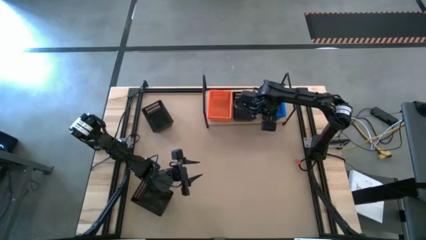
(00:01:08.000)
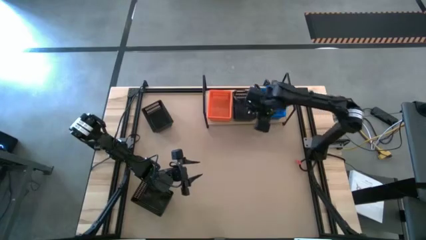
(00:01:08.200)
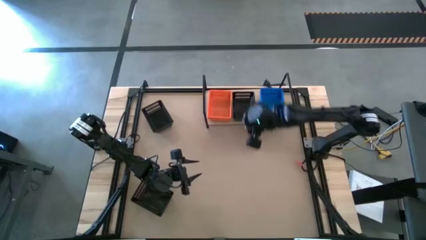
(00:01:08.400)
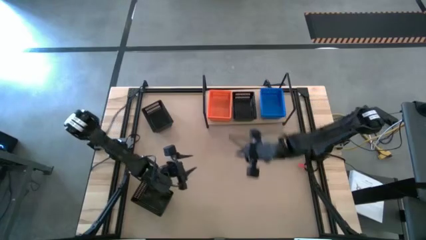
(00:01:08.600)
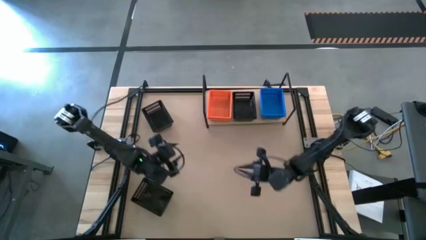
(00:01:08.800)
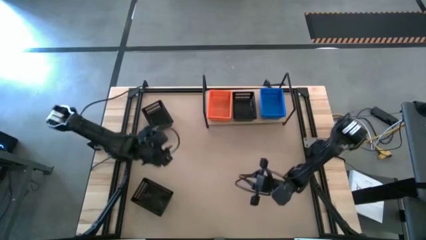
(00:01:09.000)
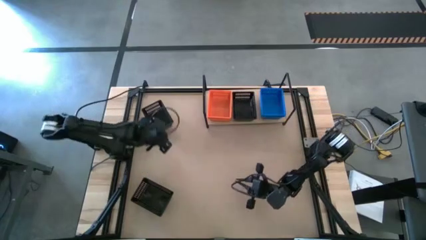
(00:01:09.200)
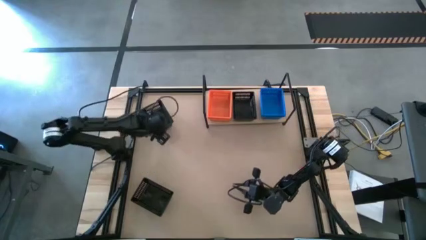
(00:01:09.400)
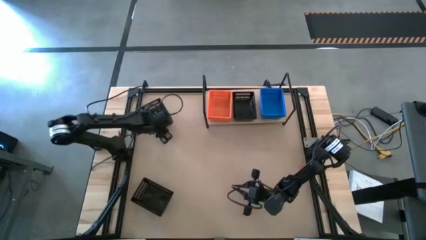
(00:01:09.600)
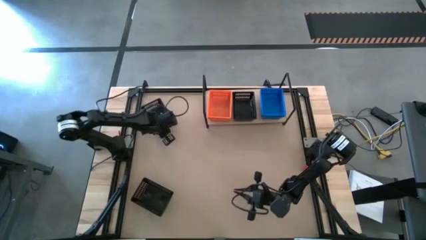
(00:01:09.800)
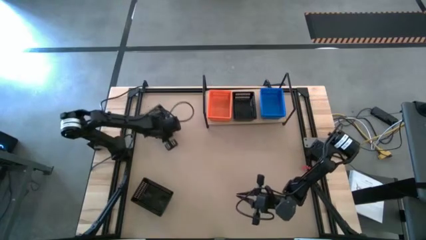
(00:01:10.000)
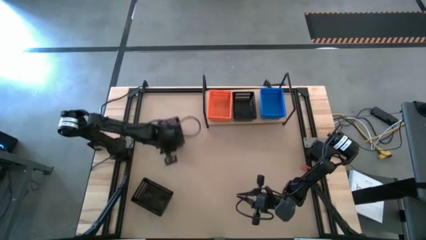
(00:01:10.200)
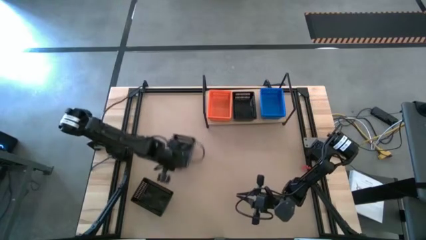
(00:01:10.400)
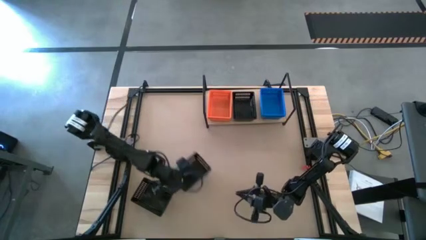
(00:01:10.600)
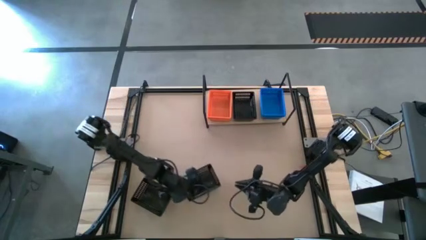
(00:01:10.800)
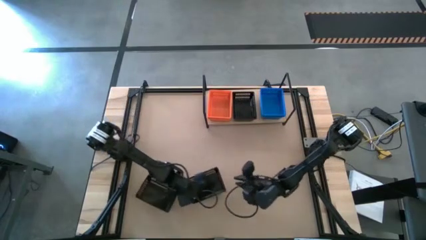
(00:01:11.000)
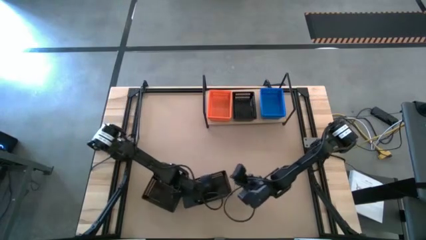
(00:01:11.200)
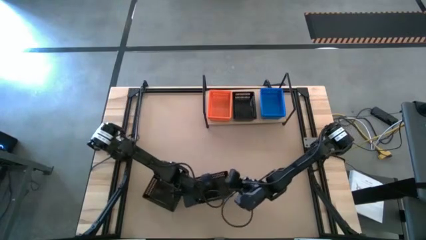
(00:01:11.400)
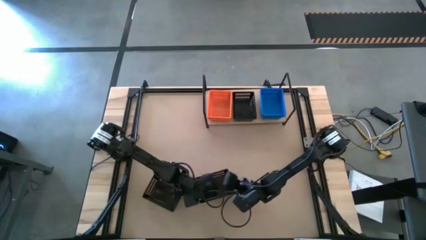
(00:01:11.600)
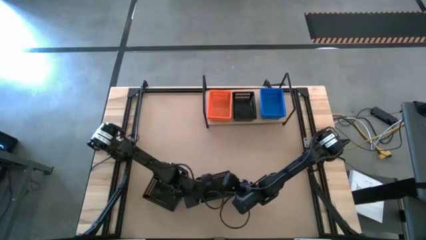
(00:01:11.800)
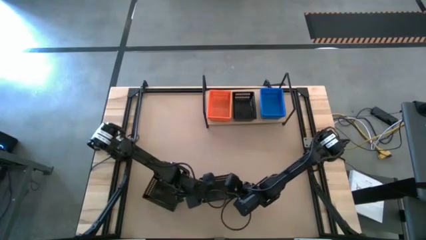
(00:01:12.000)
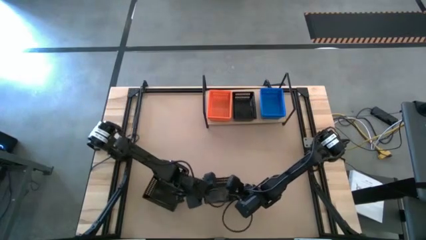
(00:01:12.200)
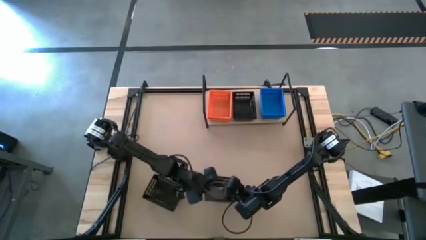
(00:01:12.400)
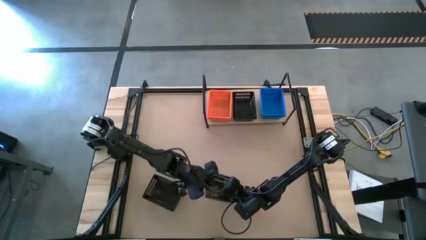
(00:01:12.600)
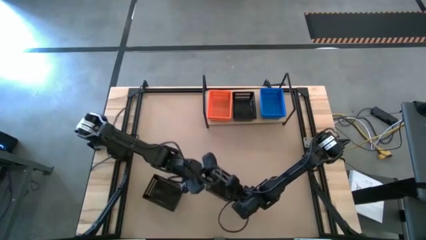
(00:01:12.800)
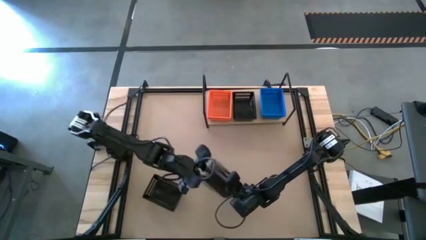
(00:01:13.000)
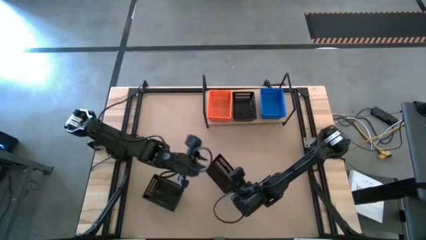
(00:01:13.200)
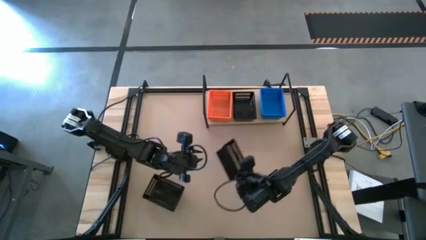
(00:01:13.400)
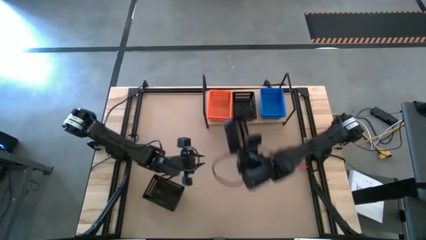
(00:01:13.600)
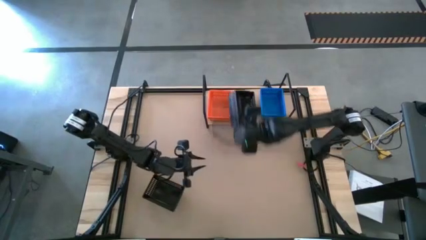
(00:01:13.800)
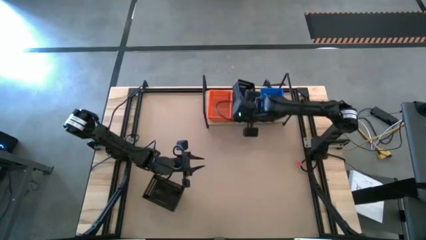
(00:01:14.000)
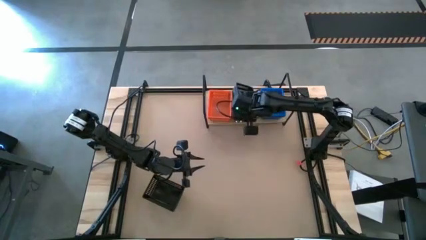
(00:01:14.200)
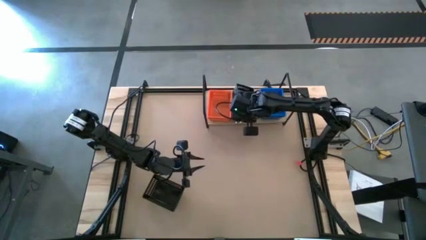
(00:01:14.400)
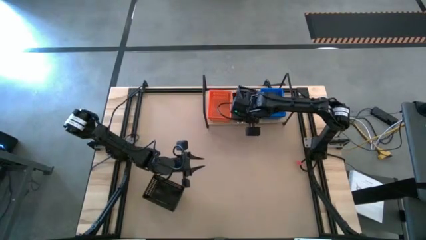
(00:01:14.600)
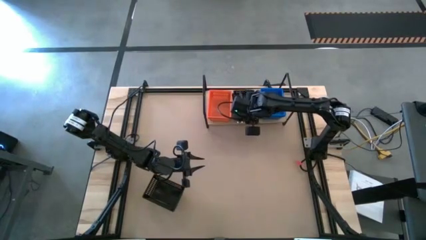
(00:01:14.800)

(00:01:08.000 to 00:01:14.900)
Task: Stack baskets on shelf by color
Stack the top black basket in the other black basket on the shelf

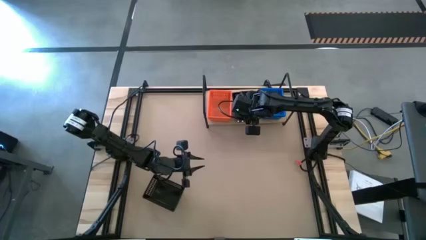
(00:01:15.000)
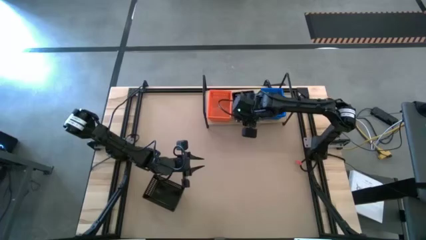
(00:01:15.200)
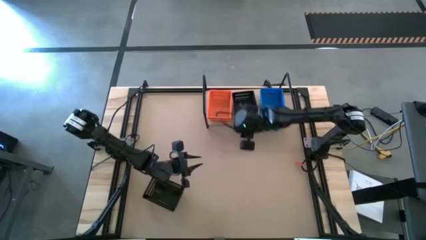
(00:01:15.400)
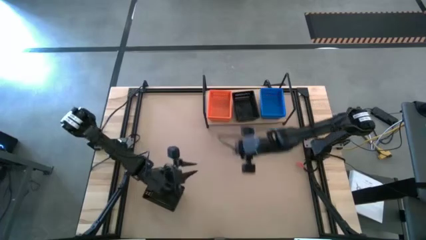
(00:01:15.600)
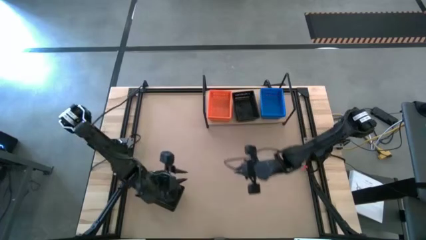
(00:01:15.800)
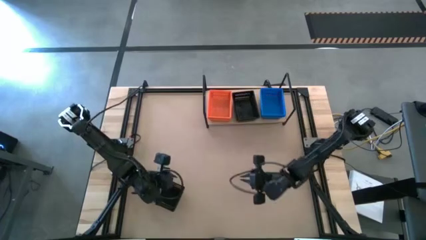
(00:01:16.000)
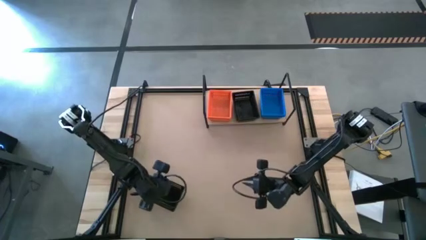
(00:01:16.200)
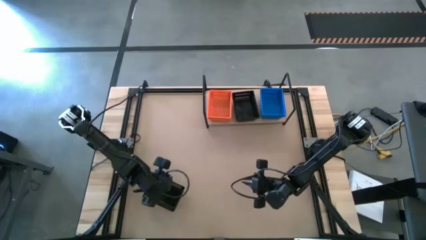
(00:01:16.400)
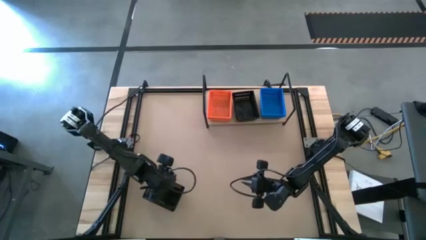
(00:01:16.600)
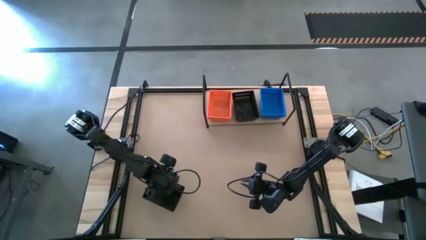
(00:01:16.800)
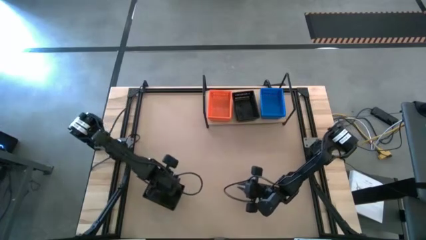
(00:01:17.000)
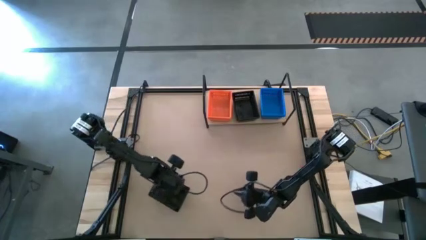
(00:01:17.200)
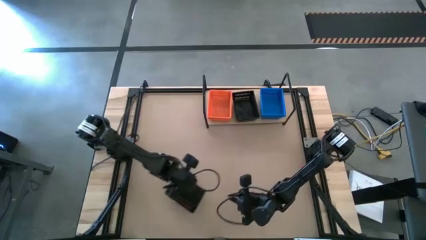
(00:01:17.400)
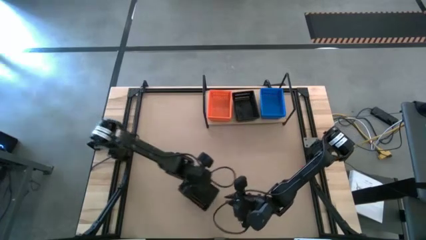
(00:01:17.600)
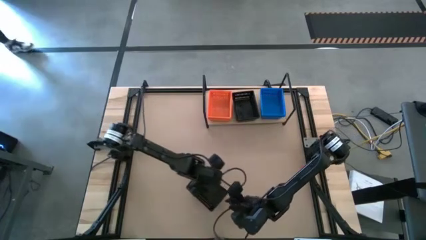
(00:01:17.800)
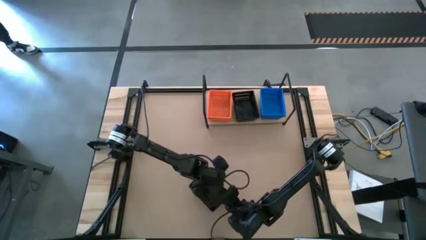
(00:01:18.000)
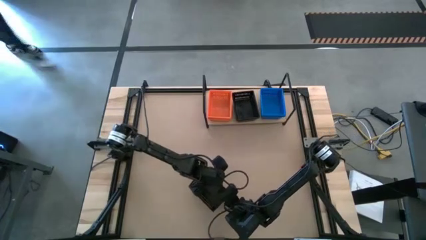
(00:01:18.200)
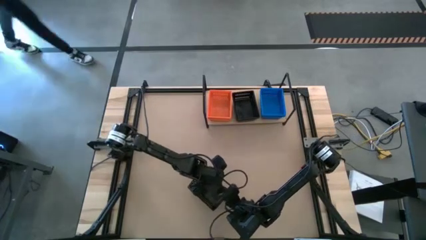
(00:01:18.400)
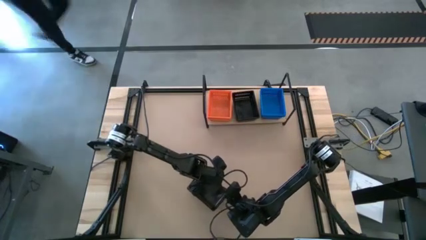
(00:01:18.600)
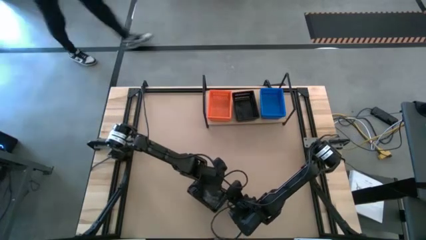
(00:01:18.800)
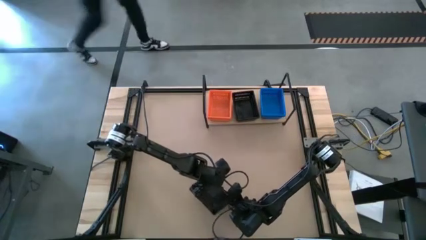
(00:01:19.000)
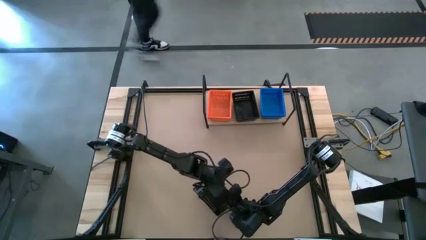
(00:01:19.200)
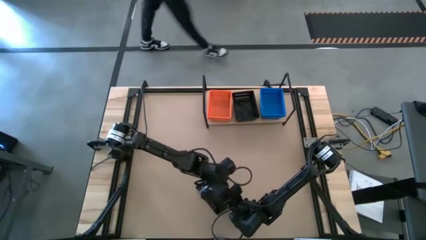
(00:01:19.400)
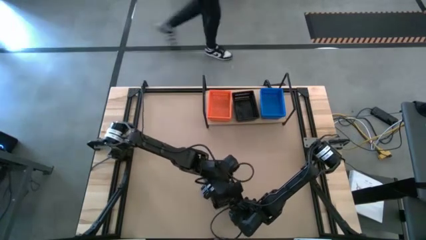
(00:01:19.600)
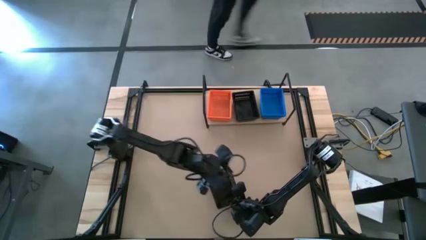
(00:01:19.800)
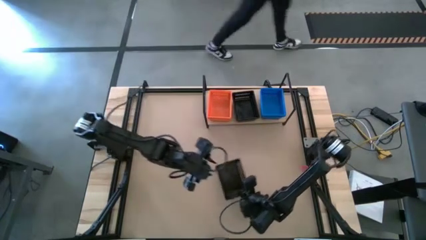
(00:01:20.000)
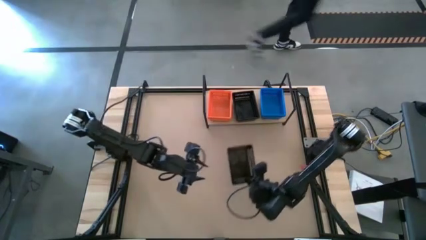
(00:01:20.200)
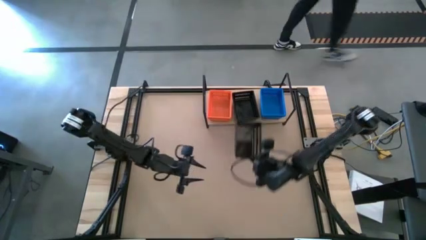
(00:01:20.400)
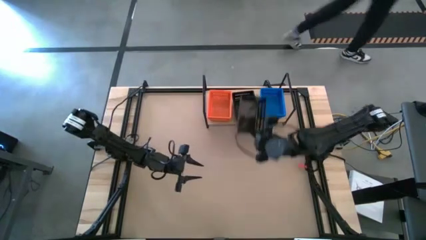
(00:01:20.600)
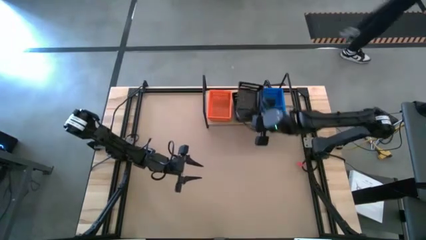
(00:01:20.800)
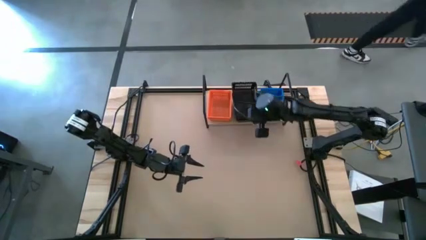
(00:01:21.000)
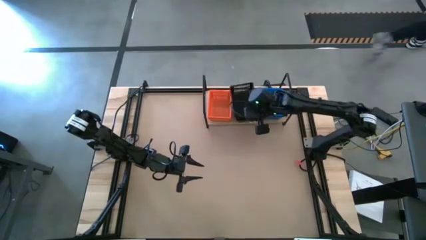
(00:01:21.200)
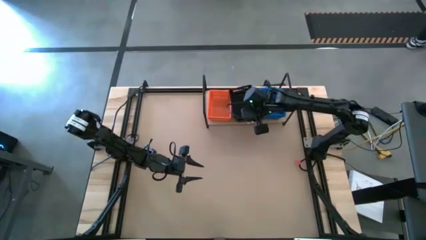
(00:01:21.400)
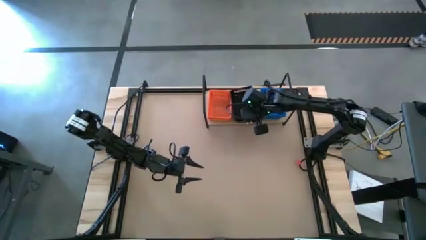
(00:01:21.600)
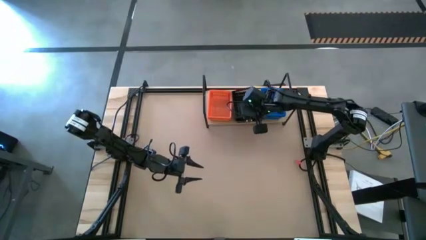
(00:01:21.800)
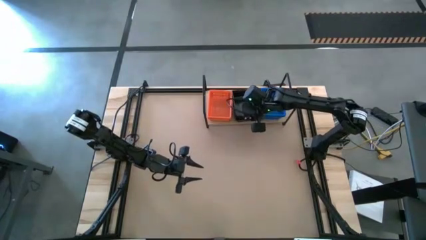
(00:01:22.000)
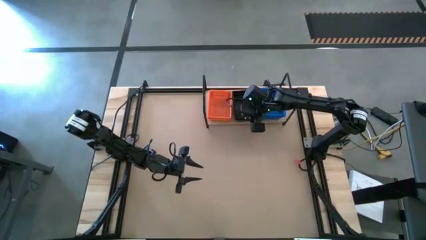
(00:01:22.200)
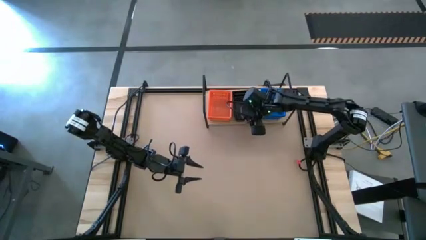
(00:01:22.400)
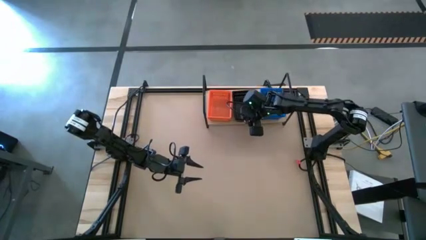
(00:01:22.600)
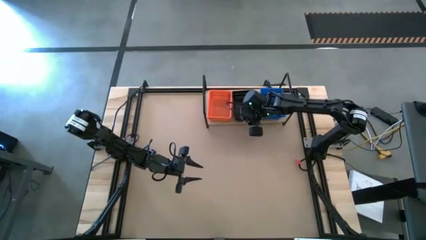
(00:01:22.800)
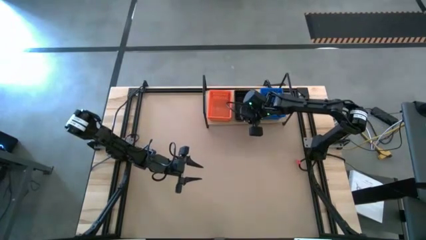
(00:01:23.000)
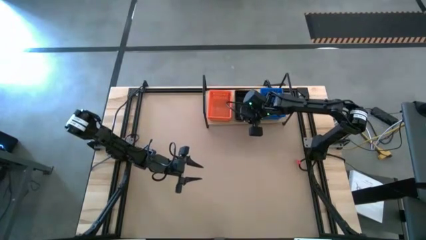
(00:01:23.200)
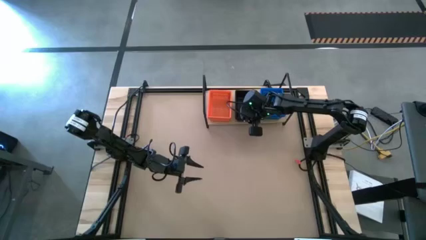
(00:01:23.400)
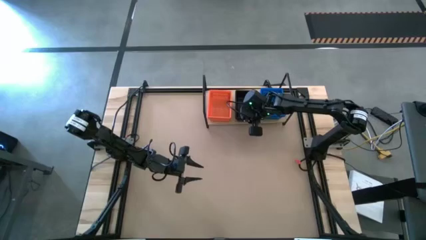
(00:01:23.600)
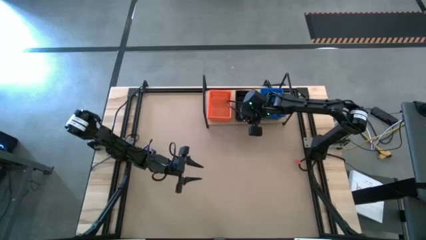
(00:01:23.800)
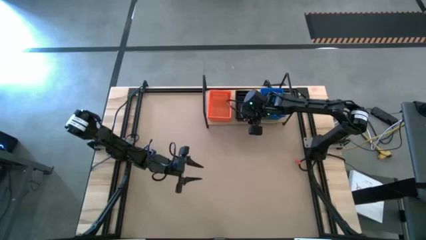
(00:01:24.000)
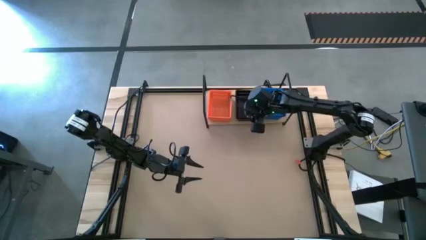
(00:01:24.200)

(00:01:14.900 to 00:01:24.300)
Stack the black basket in the other black baskets on the shelf
